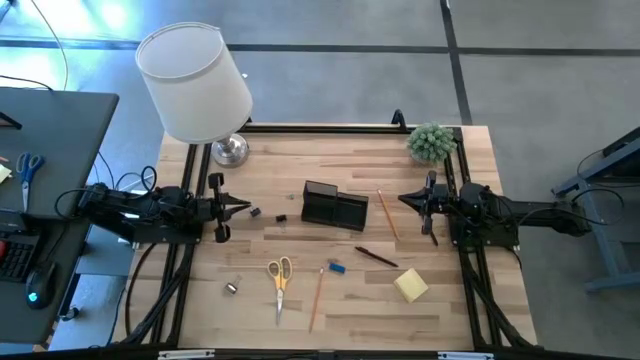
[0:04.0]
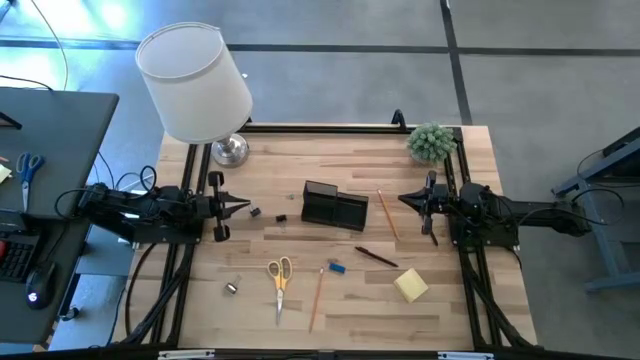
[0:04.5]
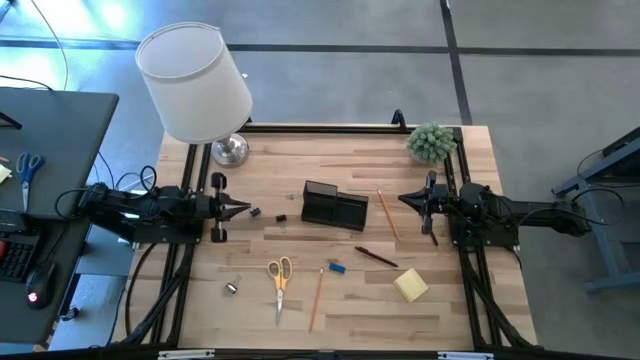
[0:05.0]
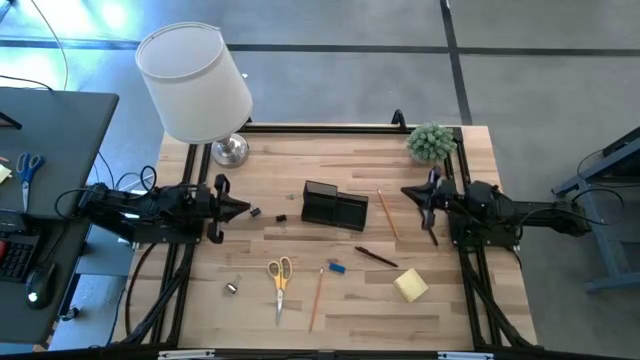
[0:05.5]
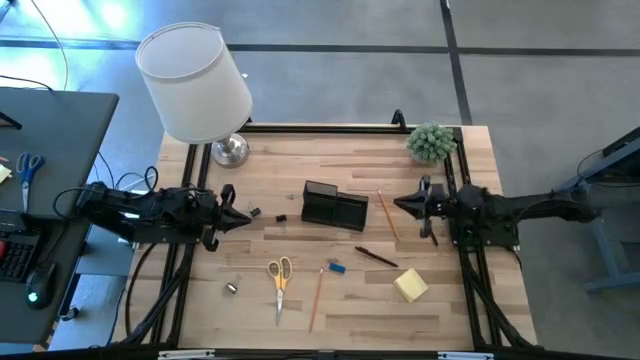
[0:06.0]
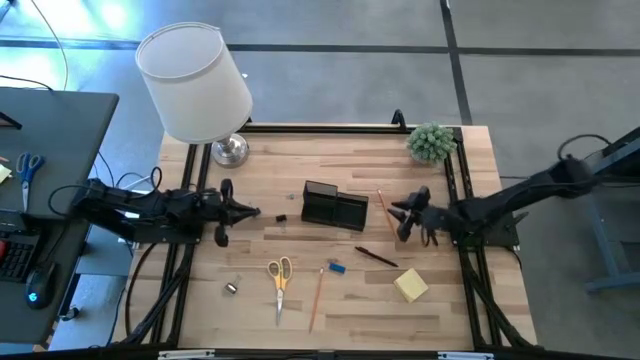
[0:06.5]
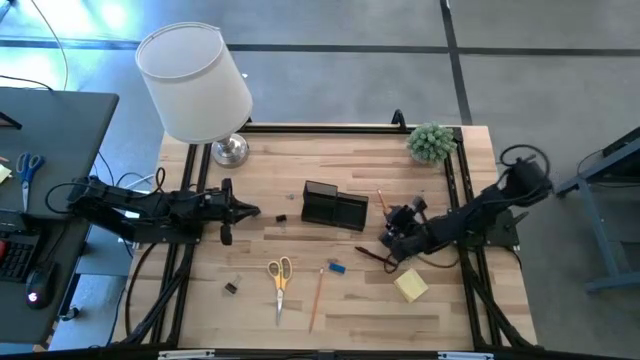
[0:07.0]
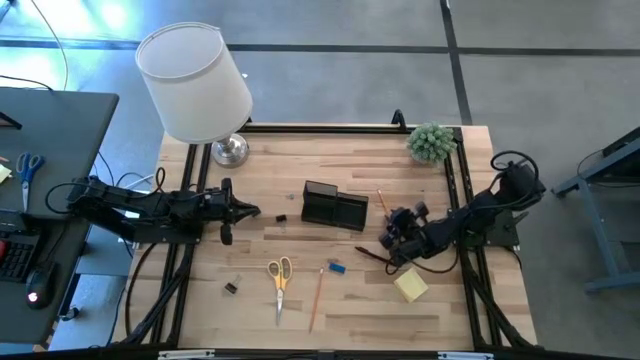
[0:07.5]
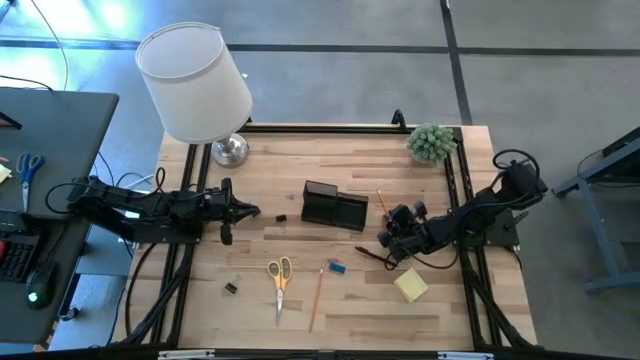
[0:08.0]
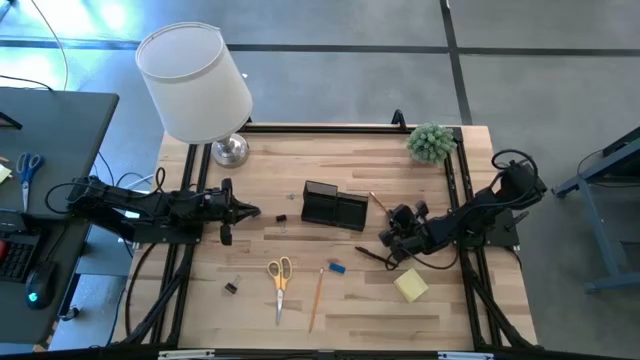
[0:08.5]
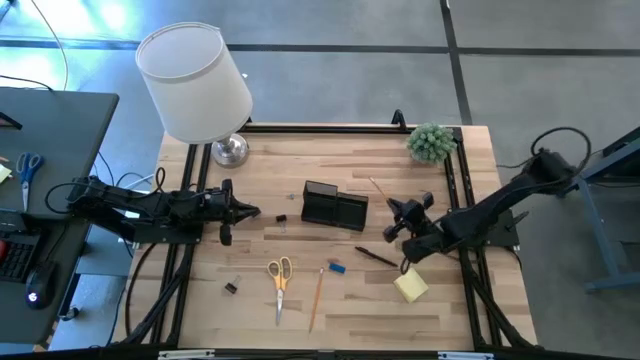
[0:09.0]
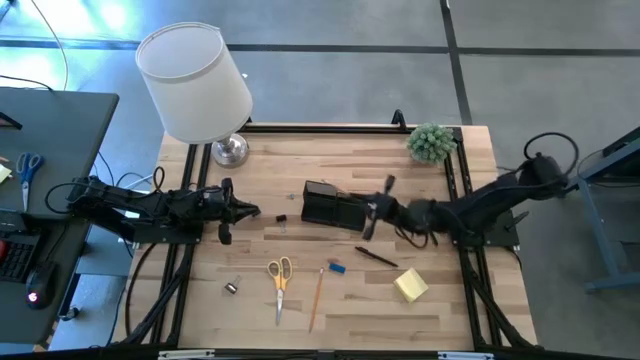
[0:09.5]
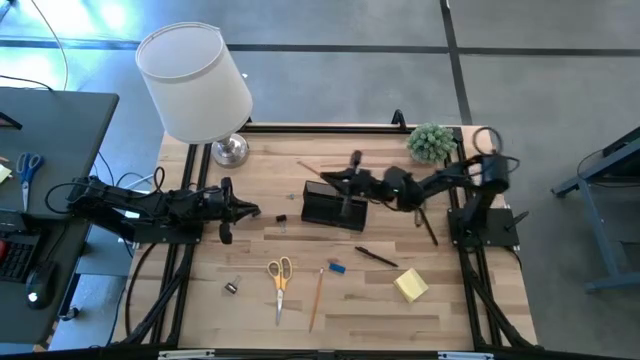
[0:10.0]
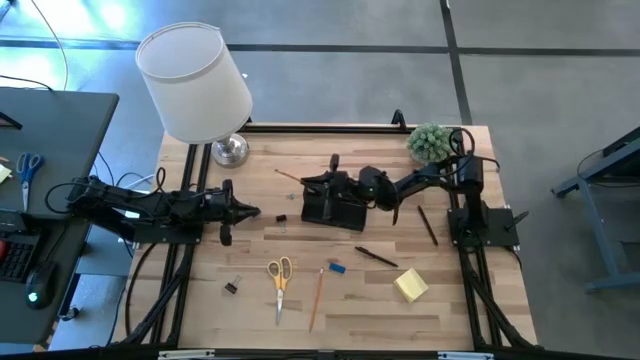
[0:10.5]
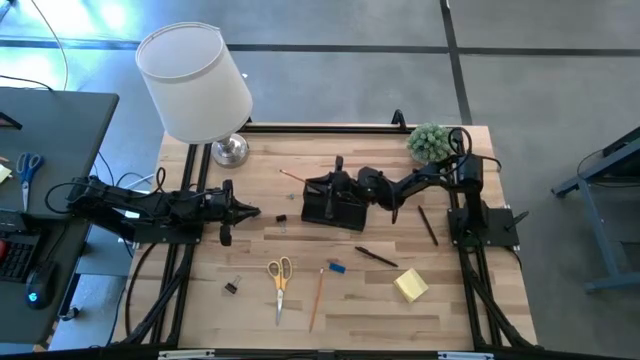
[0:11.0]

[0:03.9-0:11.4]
Task: Pick and place office supplies into organizer
Put the top orange pencil into the desk organizer

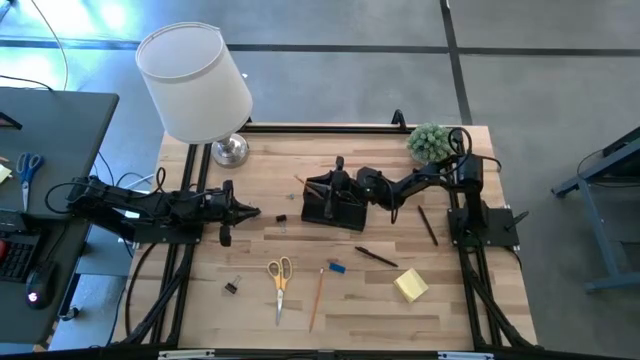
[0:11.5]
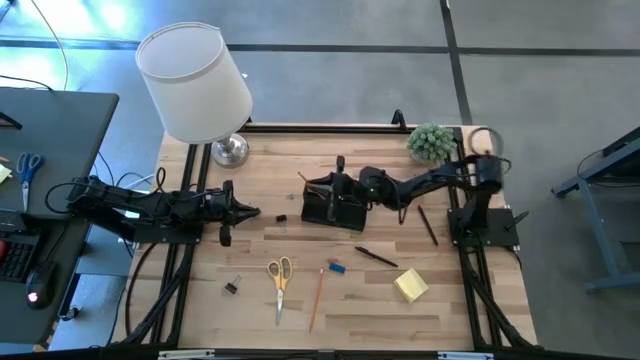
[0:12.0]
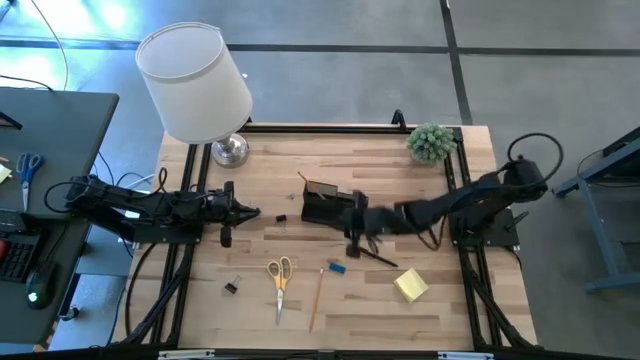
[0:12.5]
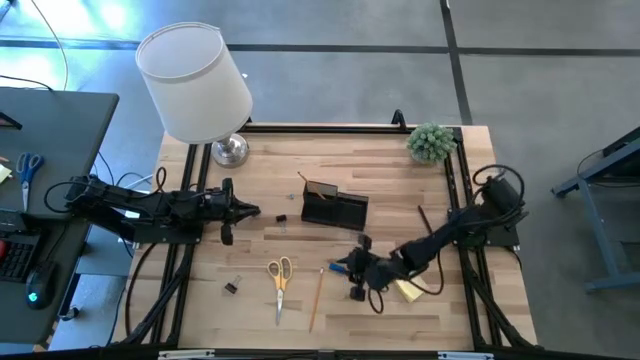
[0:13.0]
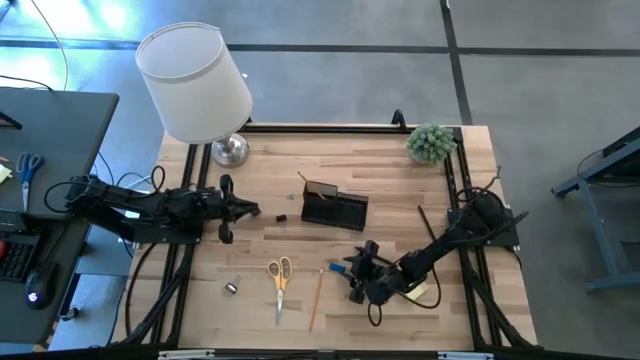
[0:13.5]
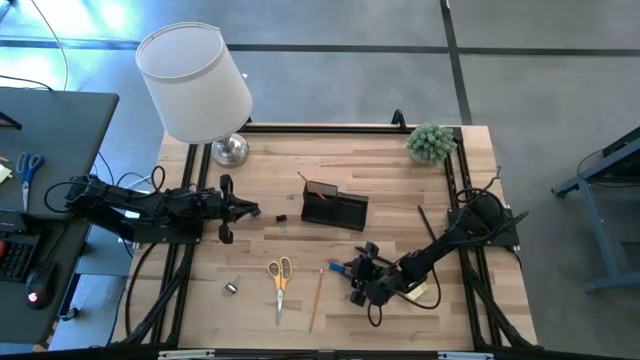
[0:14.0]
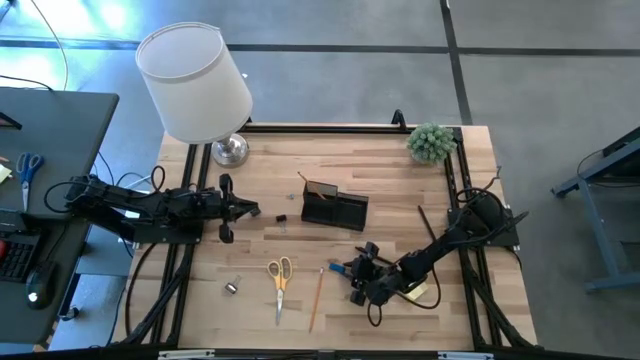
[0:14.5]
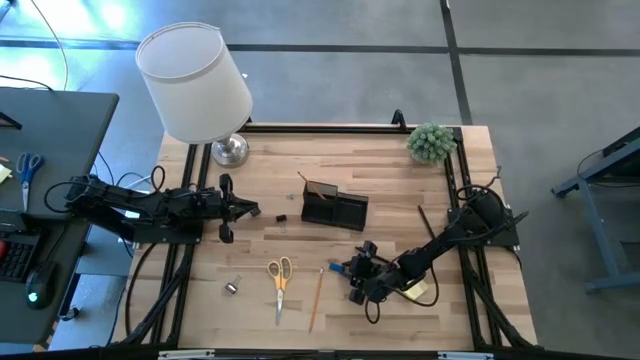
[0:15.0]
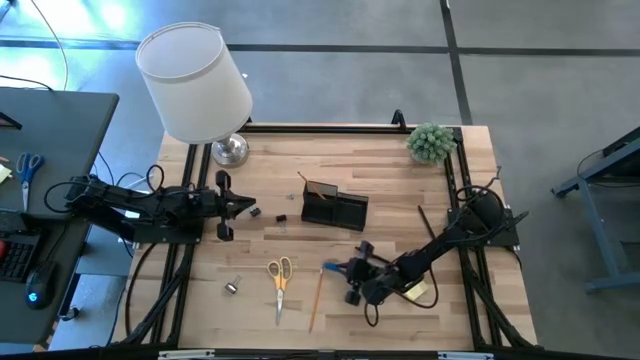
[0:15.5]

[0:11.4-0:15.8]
Put the blue eraser into the desk organizer

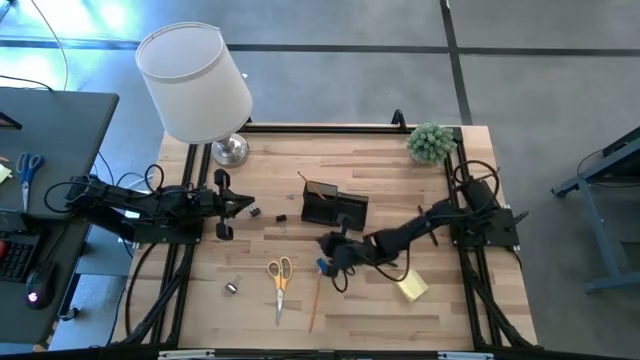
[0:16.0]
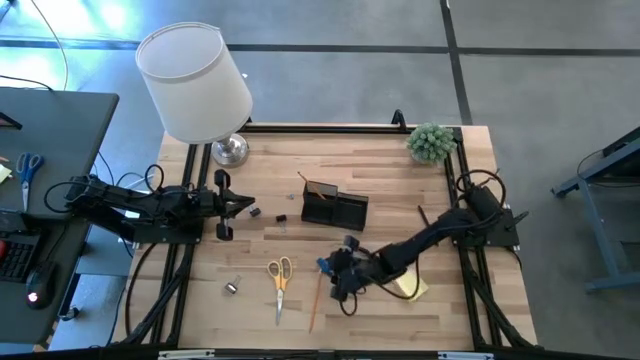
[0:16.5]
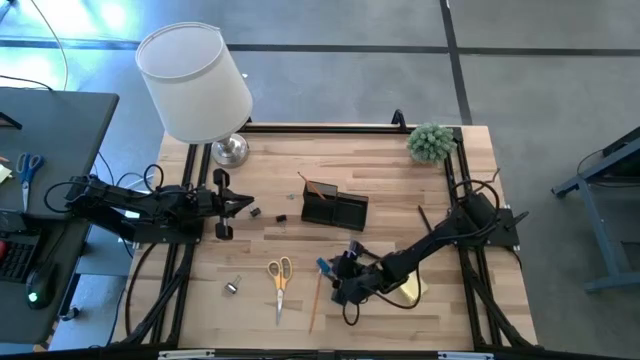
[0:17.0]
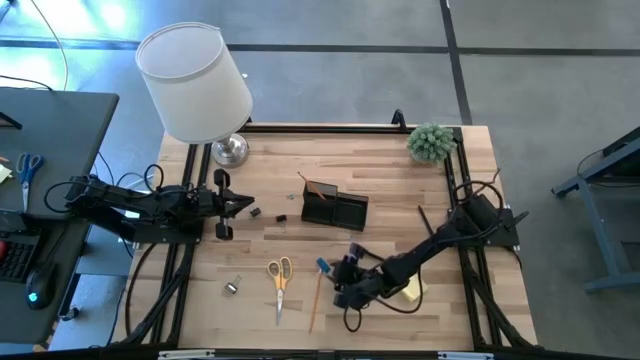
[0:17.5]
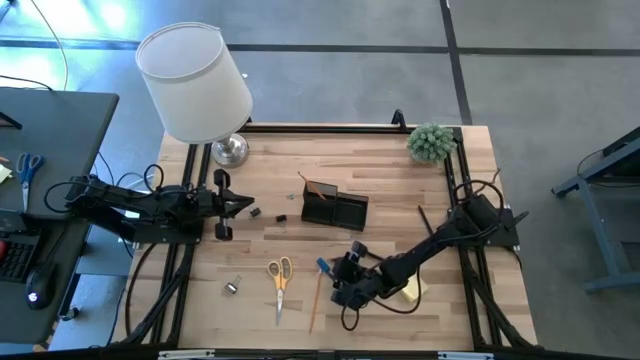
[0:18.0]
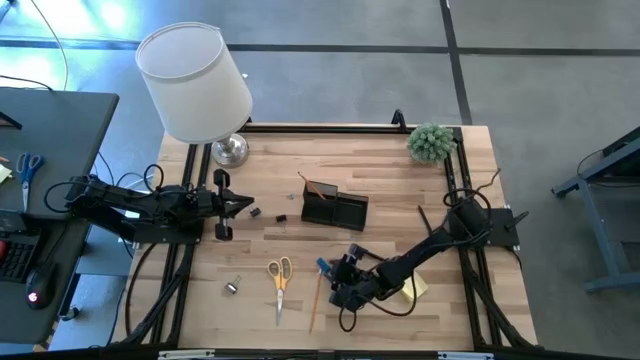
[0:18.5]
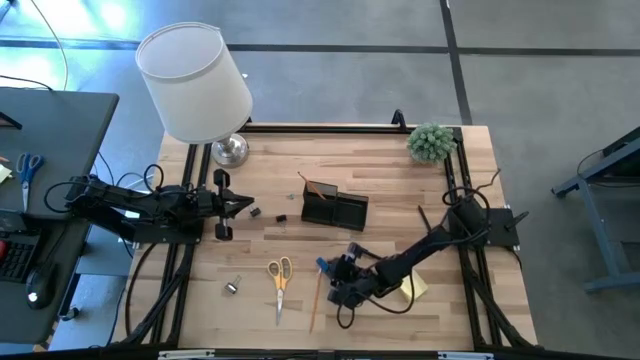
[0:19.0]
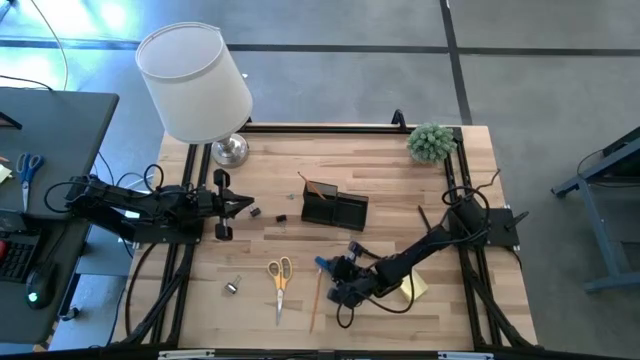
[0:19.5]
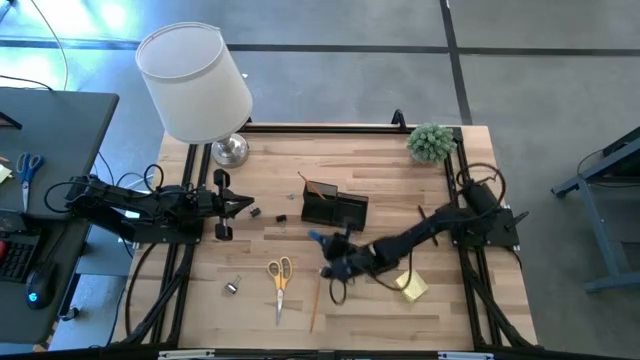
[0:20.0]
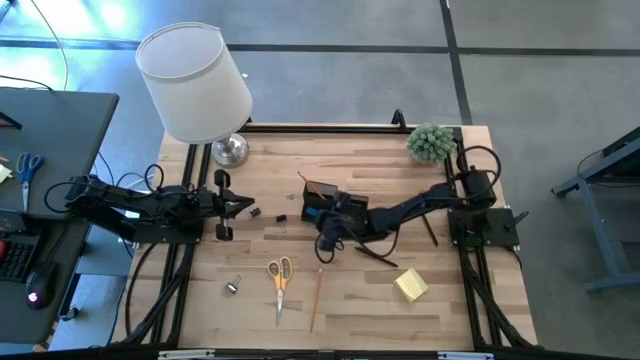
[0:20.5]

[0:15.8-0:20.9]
Put the eraser into the desk organizer

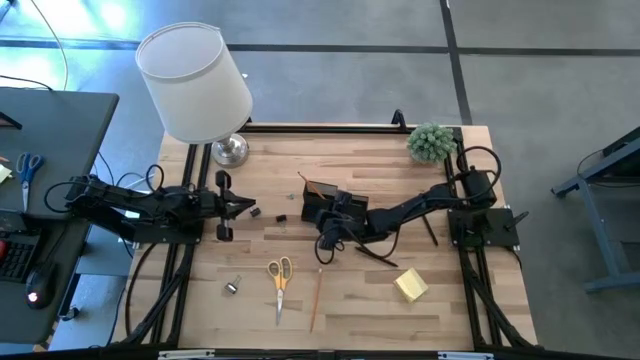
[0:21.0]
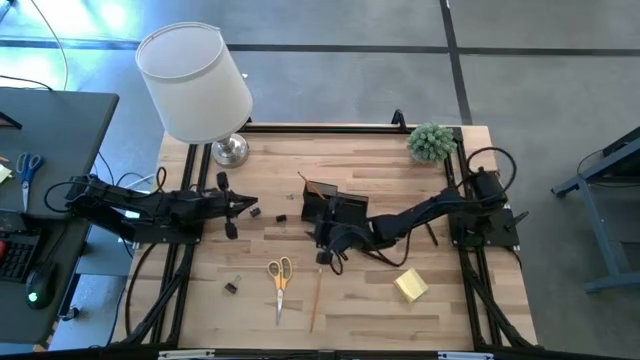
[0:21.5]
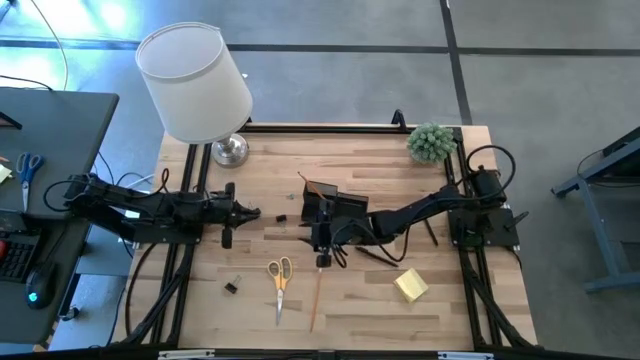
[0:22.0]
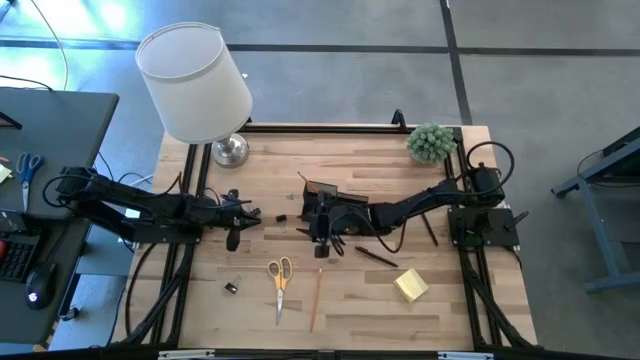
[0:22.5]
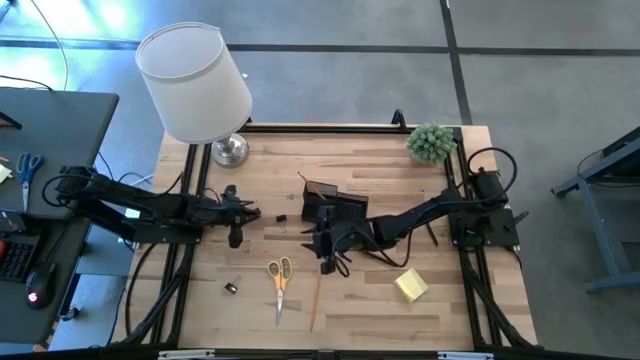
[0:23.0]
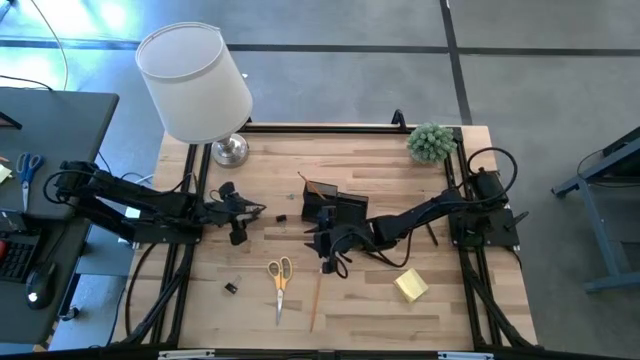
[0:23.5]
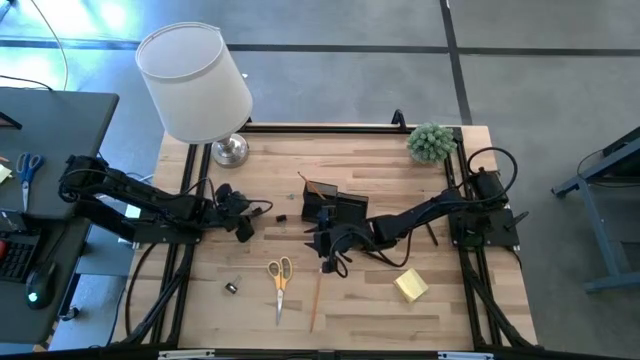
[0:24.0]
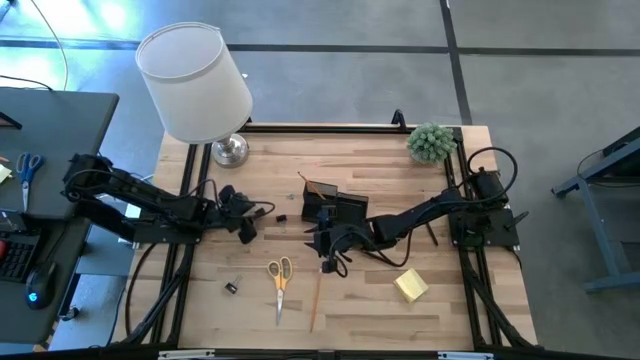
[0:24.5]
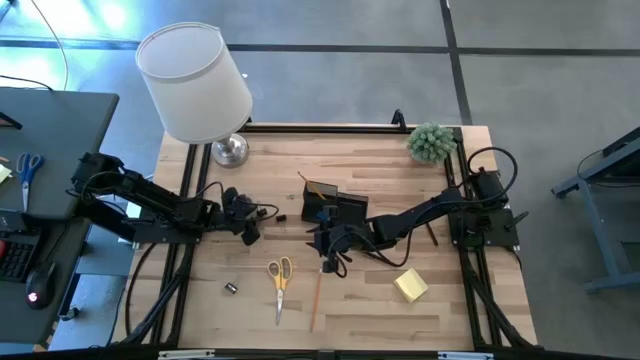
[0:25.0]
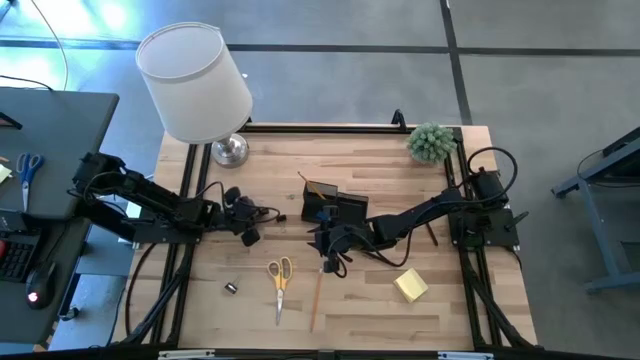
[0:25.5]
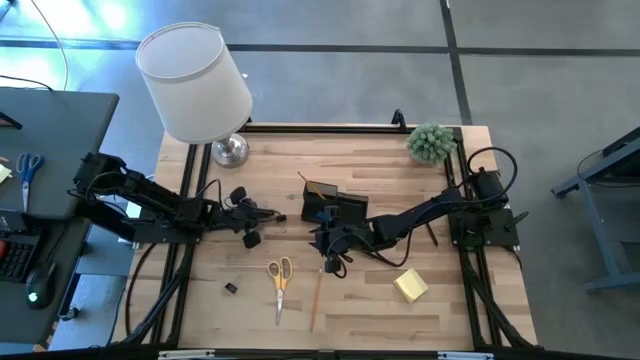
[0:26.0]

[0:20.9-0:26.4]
Put the top left black binder clip into the desk organizer
